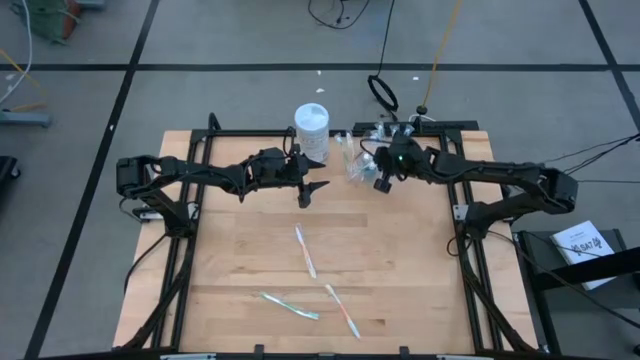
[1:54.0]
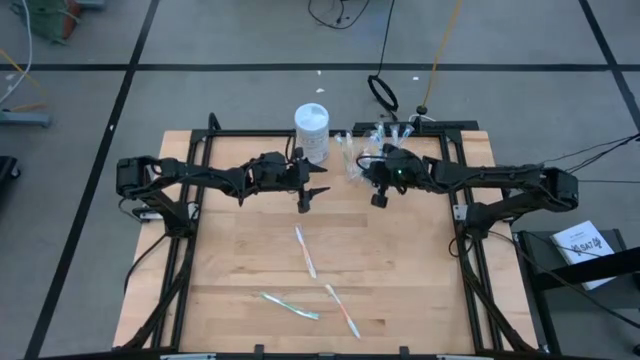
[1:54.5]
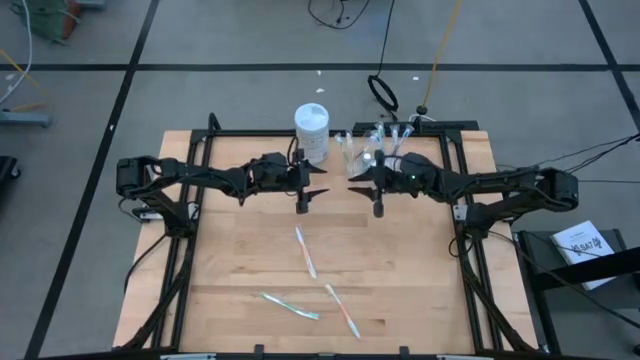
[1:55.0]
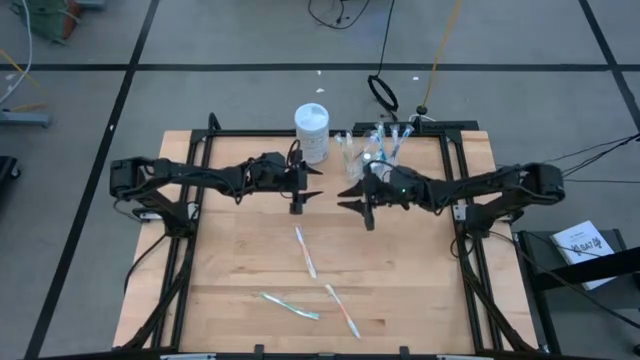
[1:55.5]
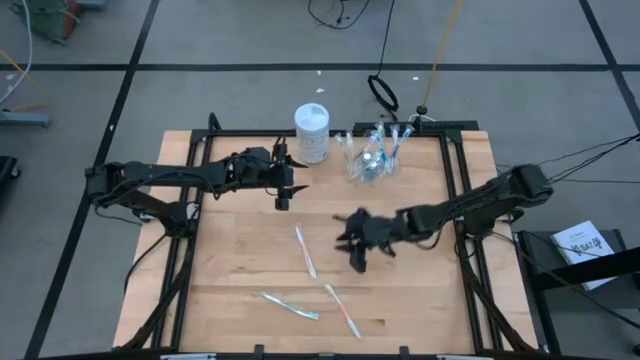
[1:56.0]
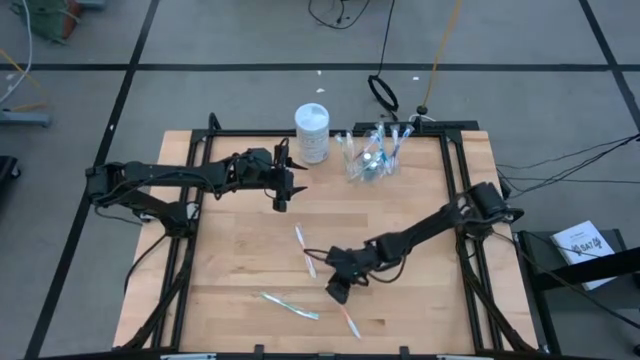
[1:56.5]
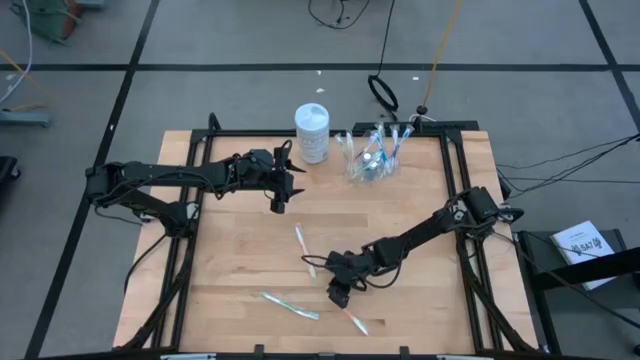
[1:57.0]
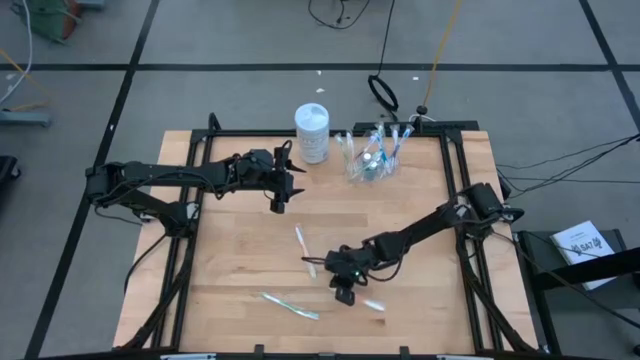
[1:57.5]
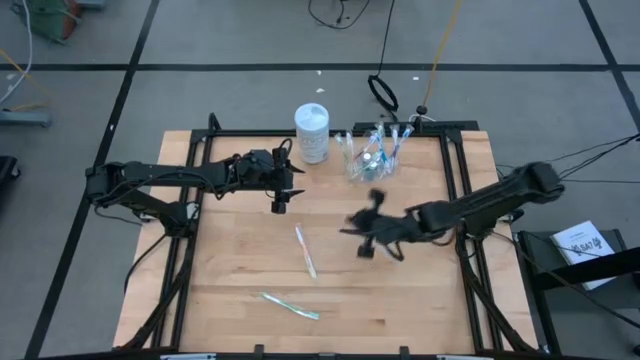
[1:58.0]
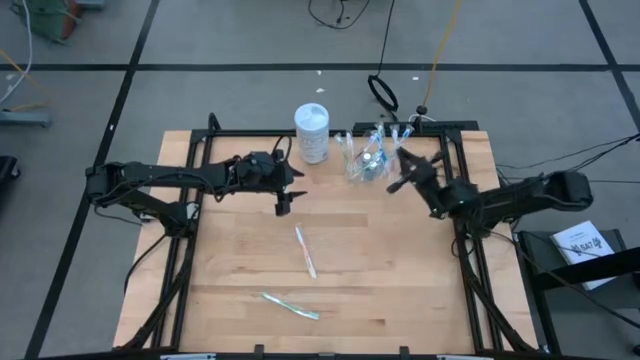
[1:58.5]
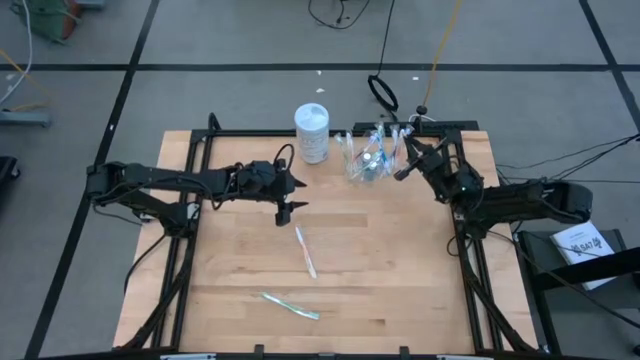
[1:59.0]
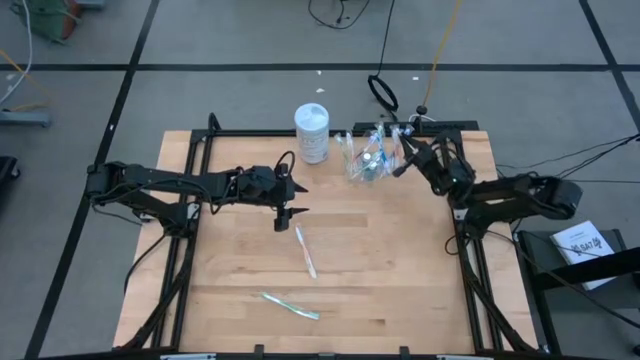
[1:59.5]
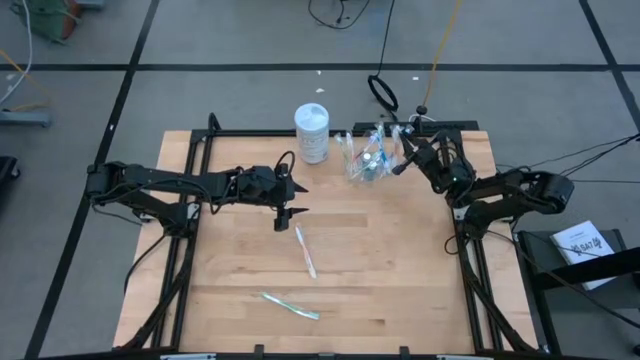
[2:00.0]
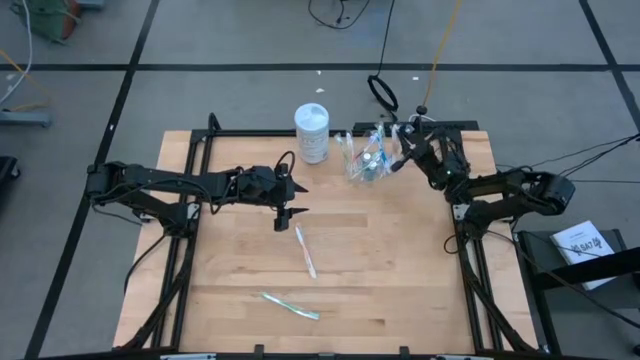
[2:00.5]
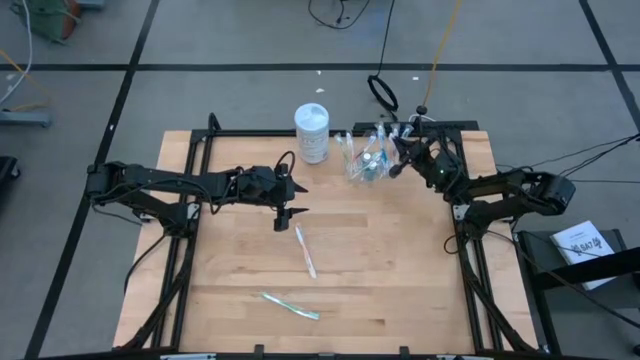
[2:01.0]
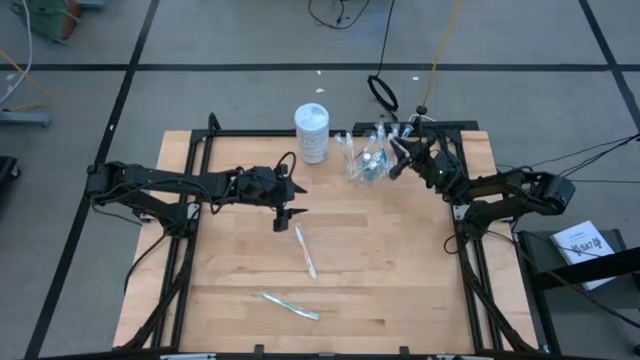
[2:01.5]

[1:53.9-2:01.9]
Task: Pick & Place toothbrushing station
Put the orange toothbrush into the transparent organizer

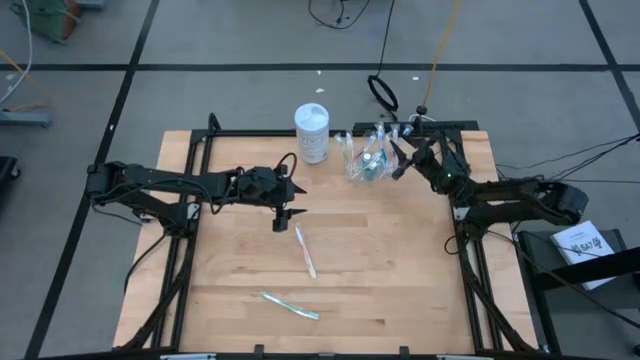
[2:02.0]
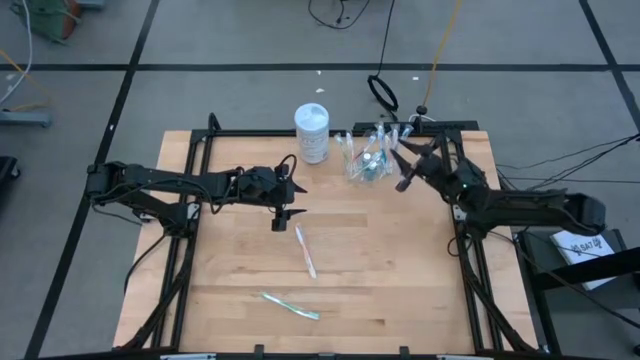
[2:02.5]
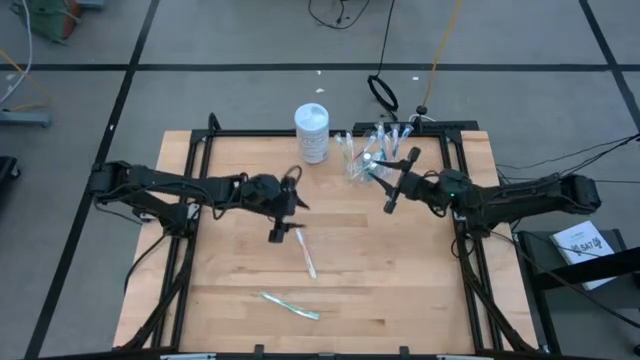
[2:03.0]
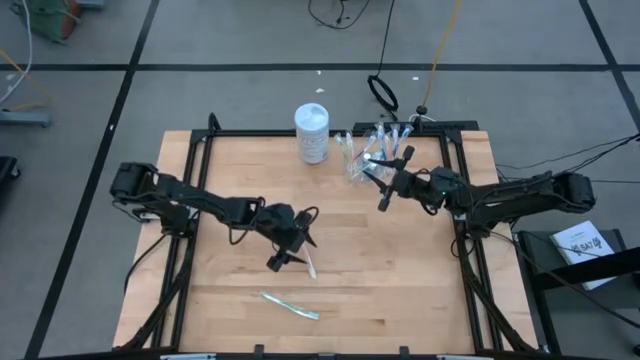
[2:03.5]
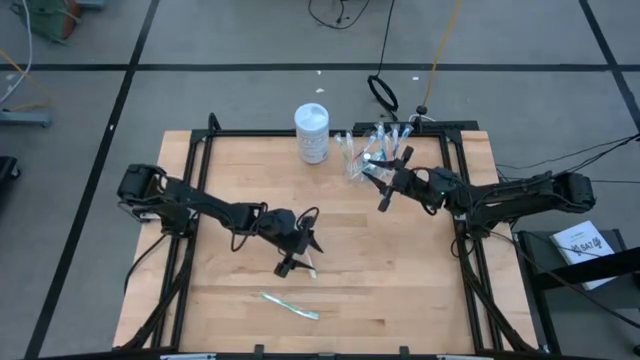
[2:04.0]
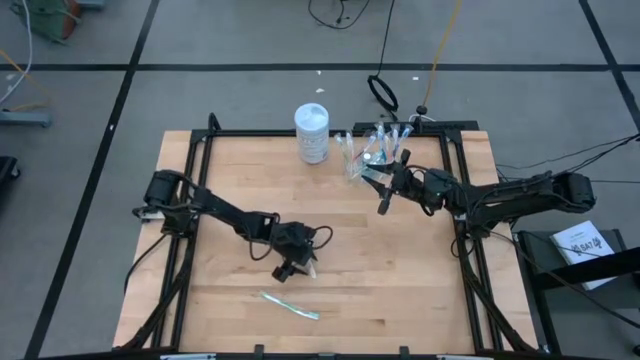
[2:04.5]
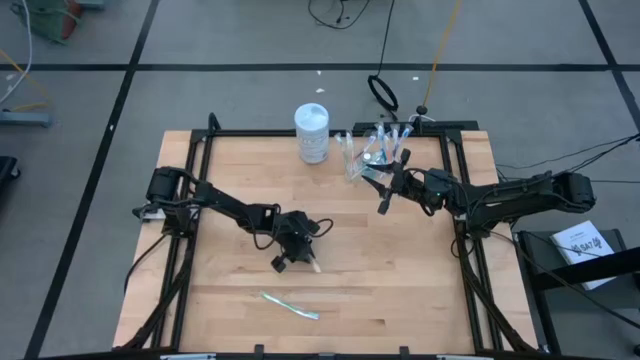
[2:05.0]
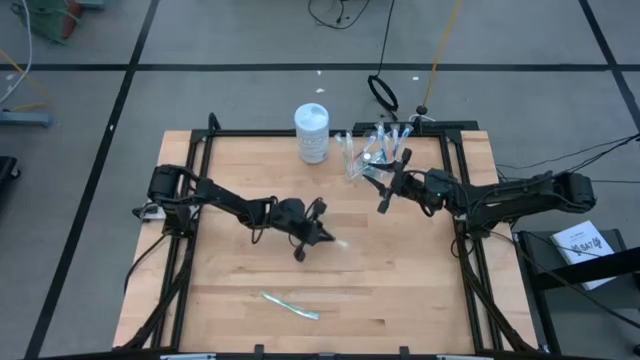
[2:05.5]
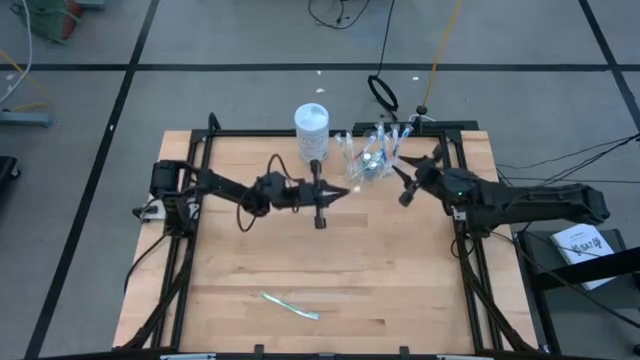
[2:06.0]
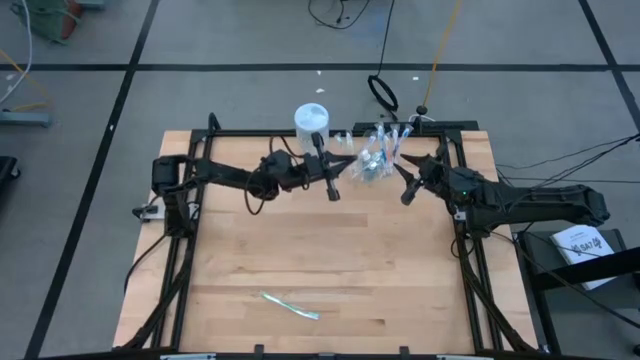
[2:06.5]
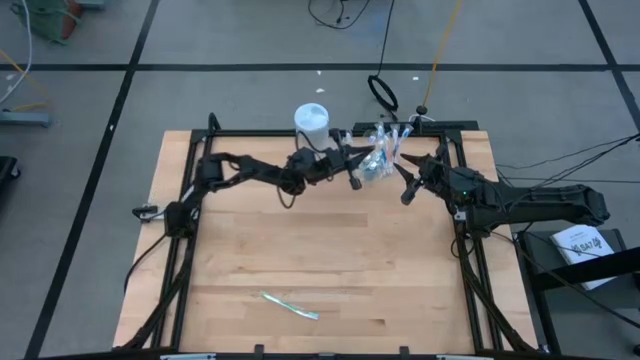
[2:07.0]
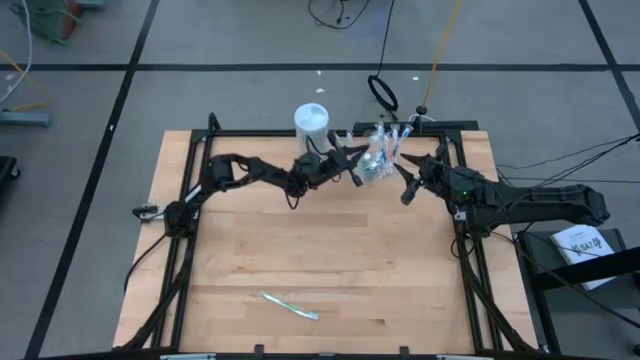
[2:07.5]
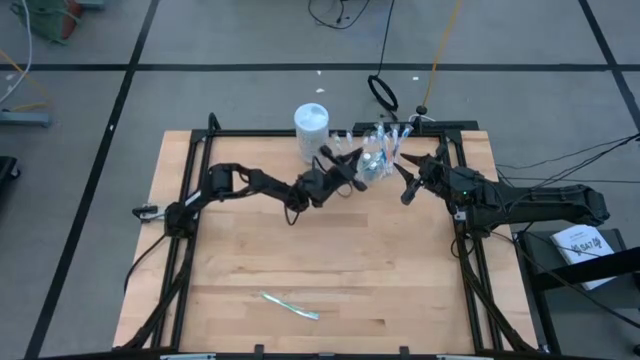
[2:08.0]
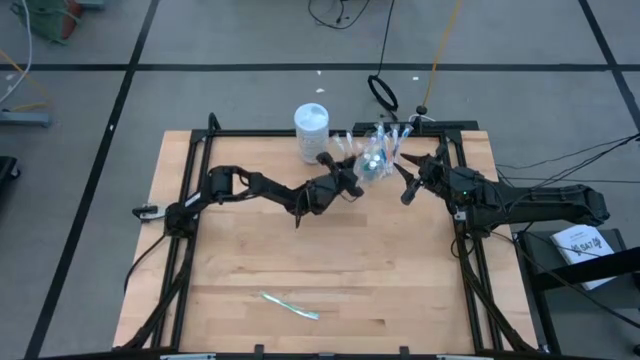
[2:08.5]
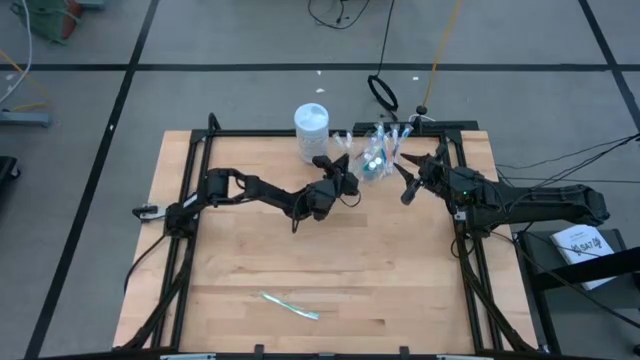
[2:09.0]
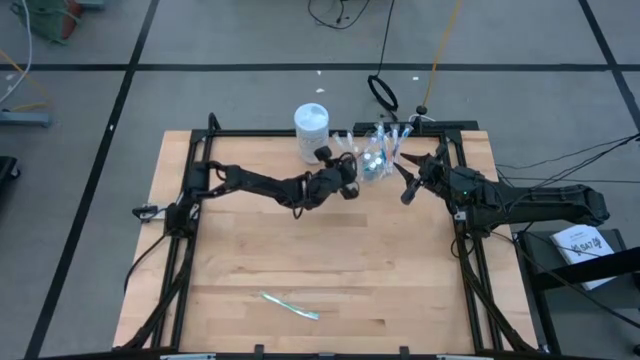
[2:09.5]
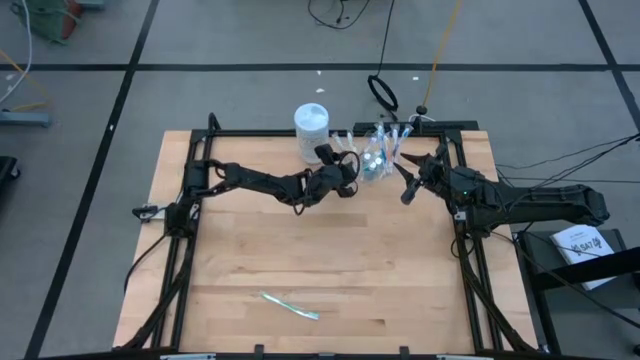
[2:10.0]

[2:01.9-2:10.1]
Put the orange toothbrush into the transparent organizer

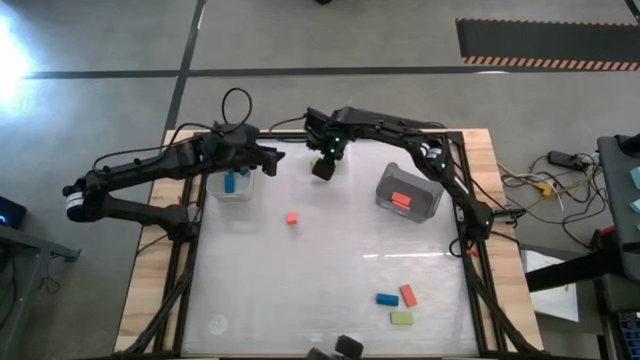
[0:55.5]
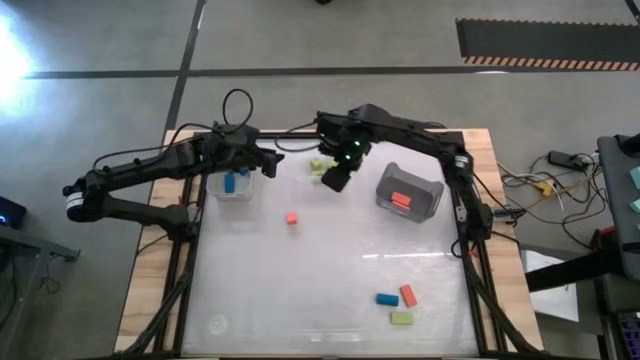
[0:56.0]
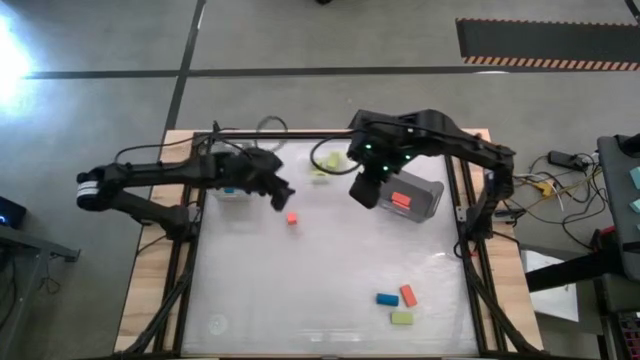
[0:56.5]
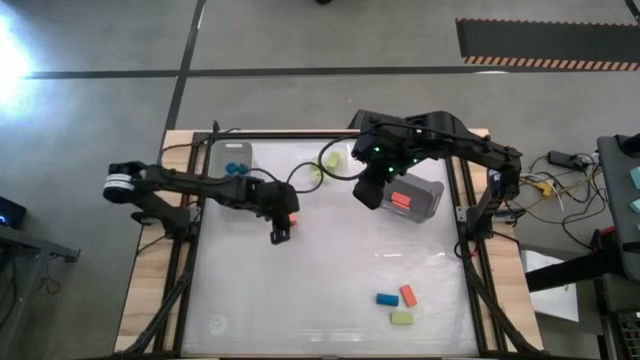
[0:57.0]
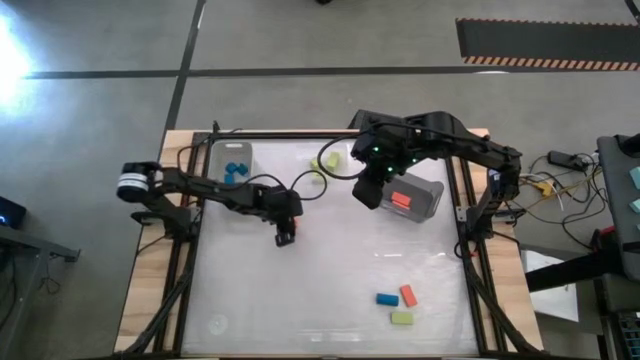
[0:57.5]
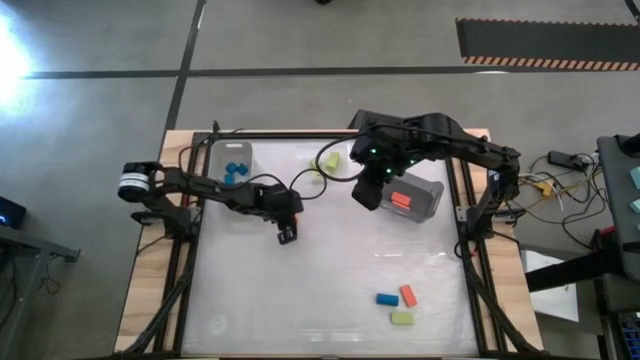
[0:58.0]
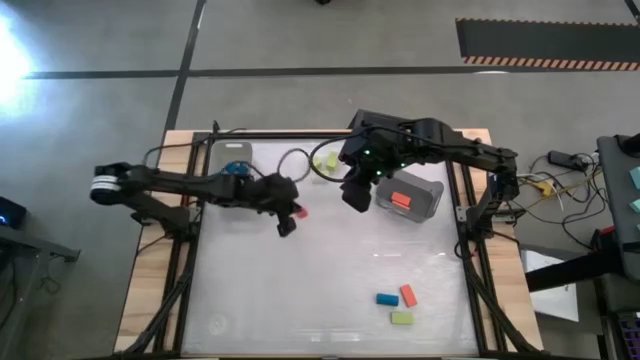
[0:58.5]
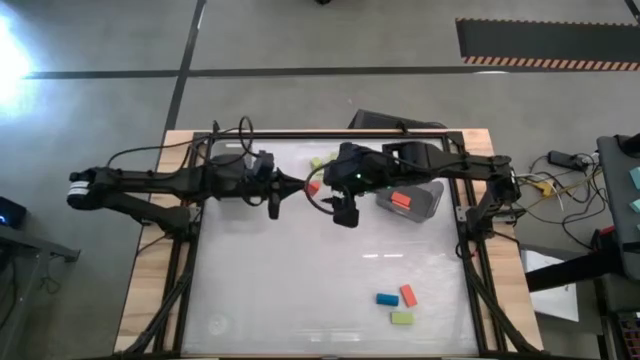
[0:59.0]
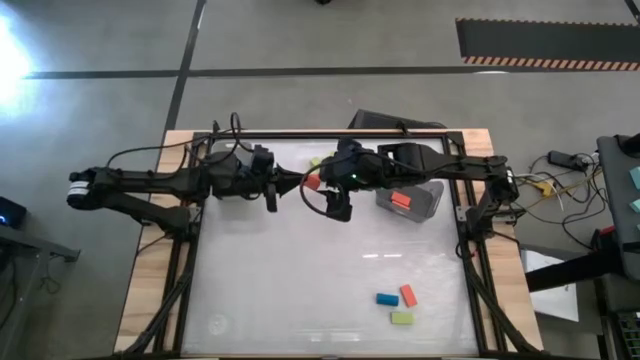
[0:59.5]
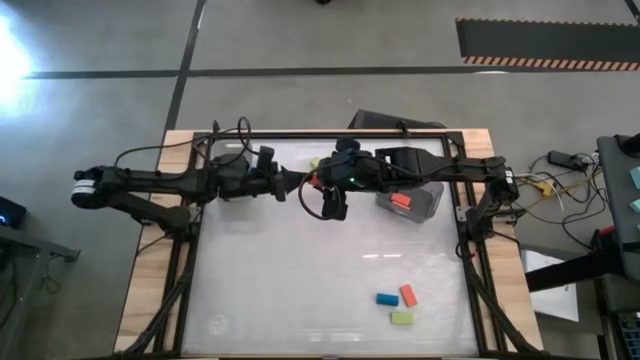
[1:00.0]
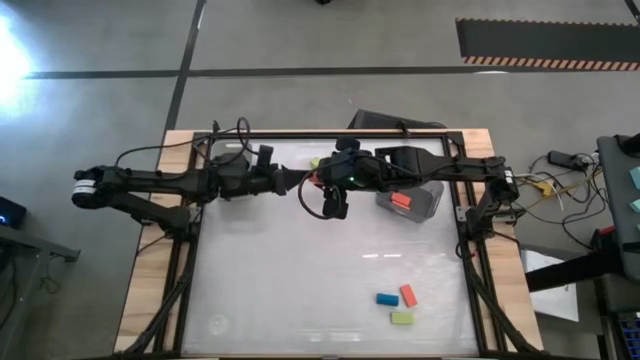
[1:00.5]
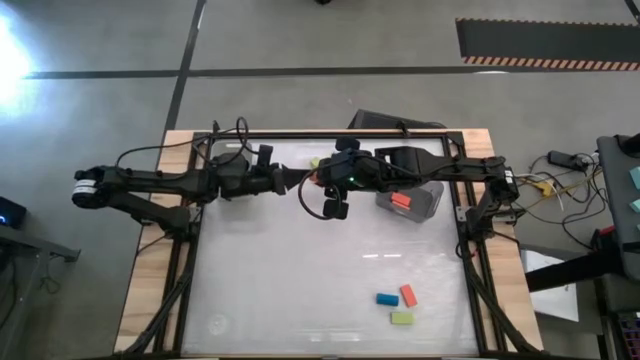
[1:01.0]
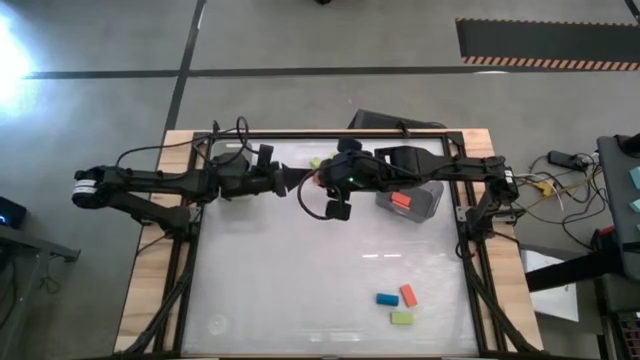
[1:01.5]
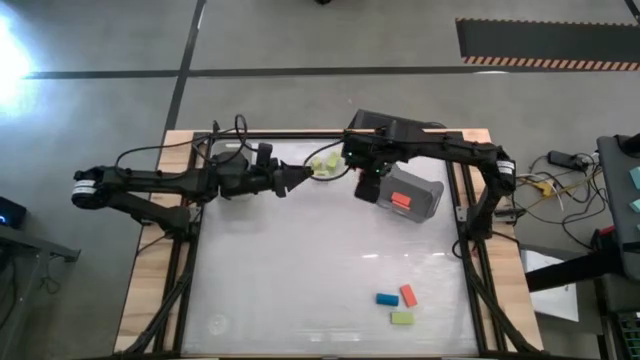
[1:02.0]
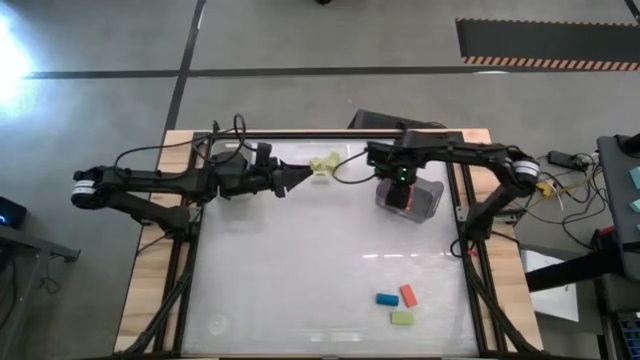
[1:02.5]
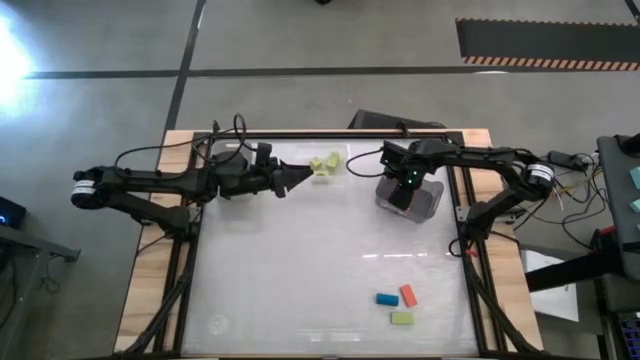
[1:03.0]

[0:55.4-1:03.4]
Task: Sort & place blocks by color
Put the orange block into the black bin
